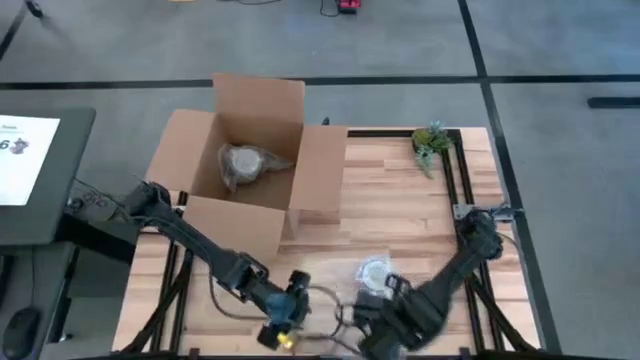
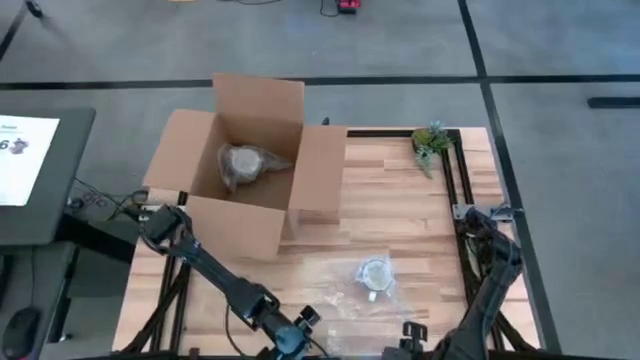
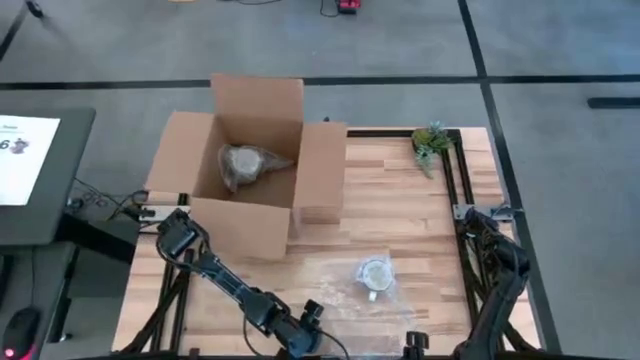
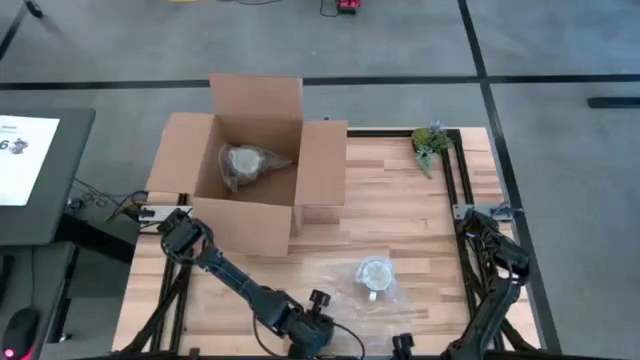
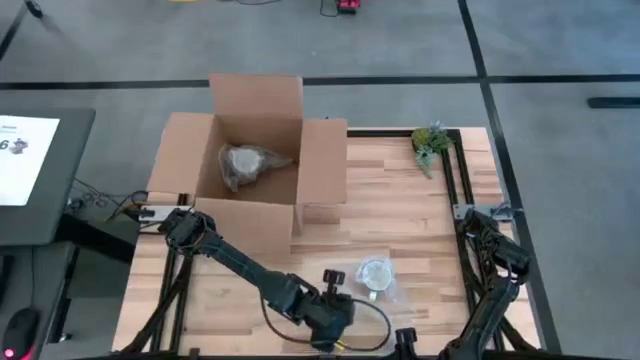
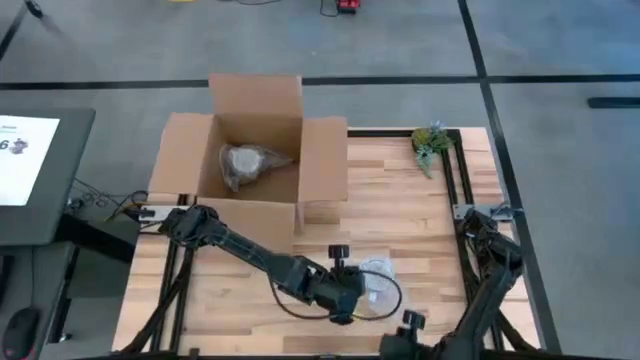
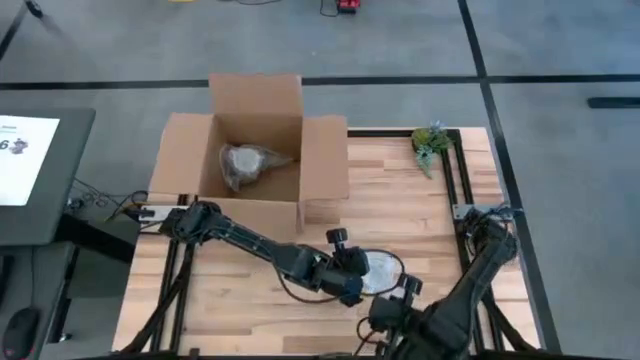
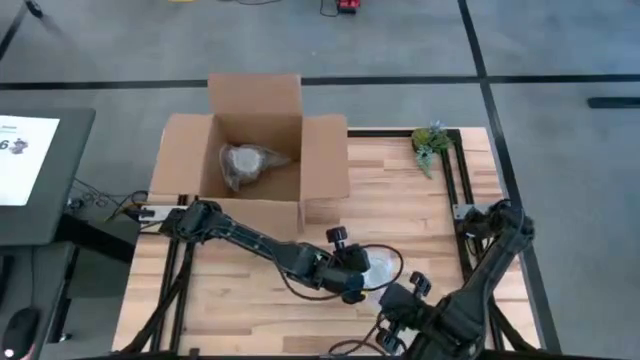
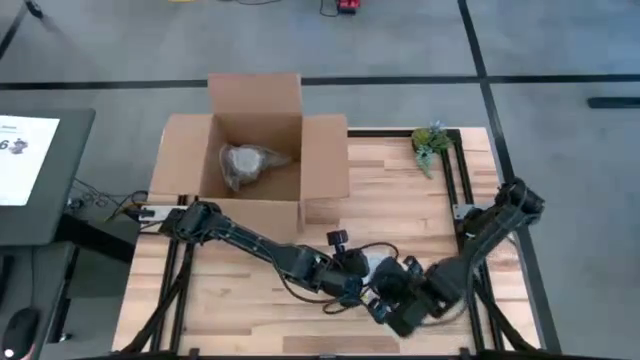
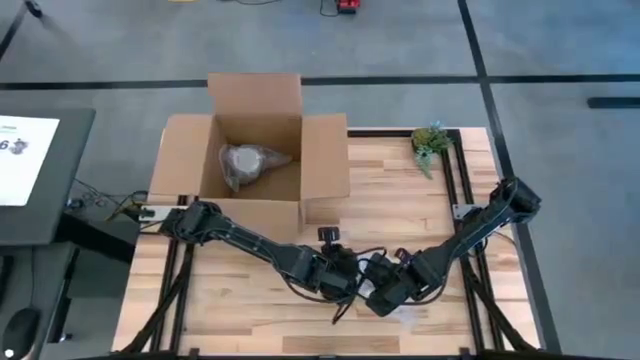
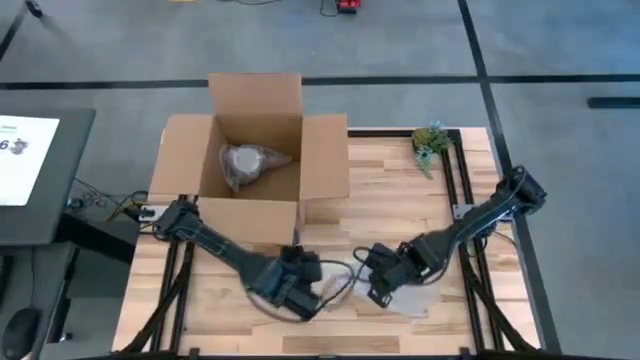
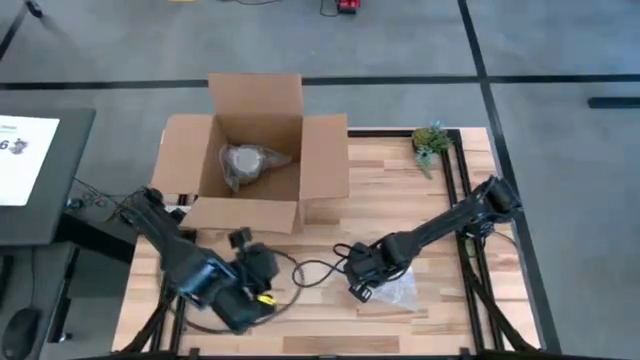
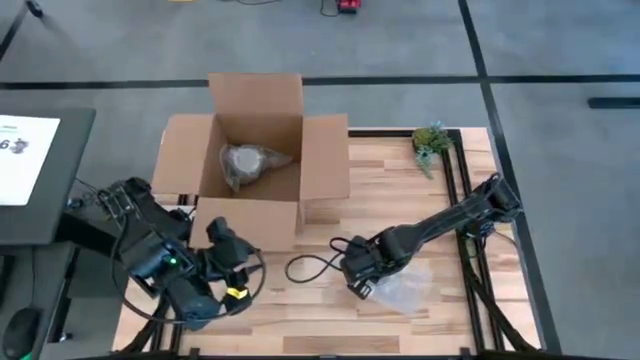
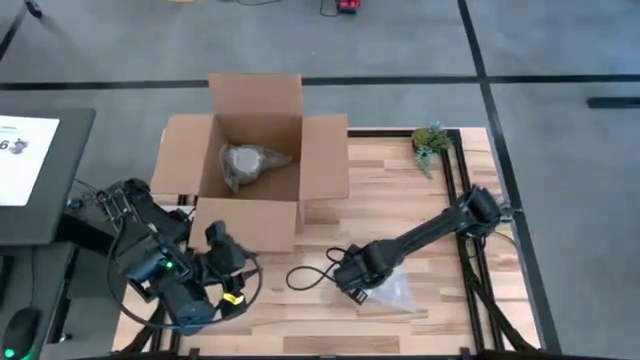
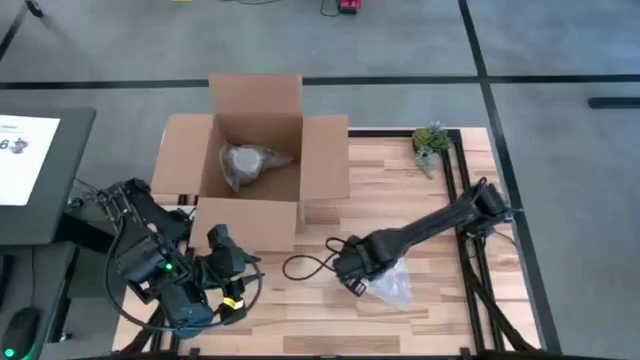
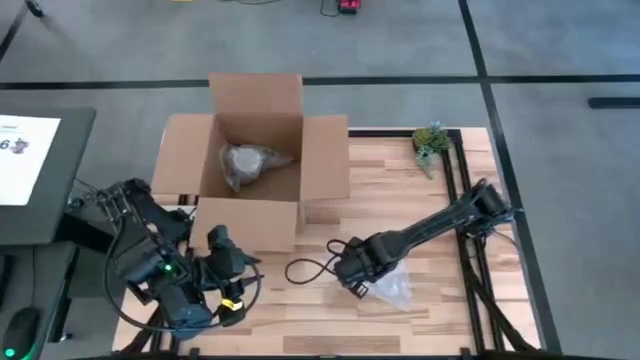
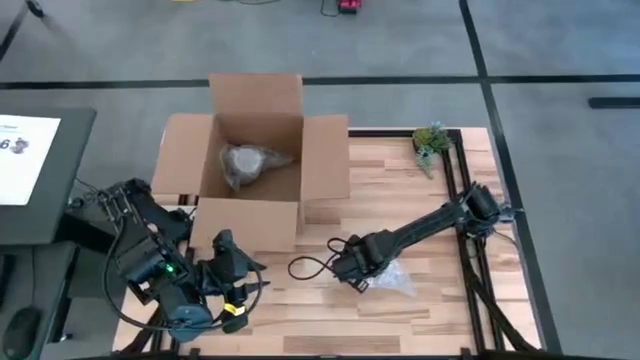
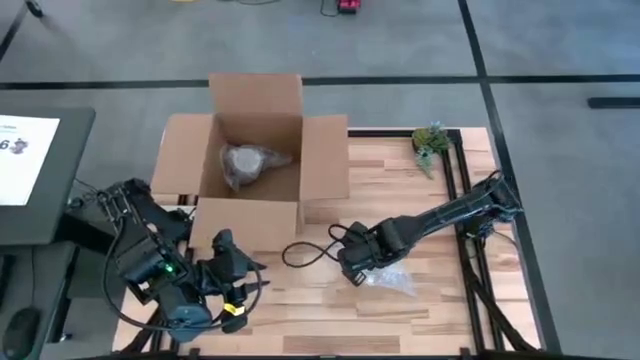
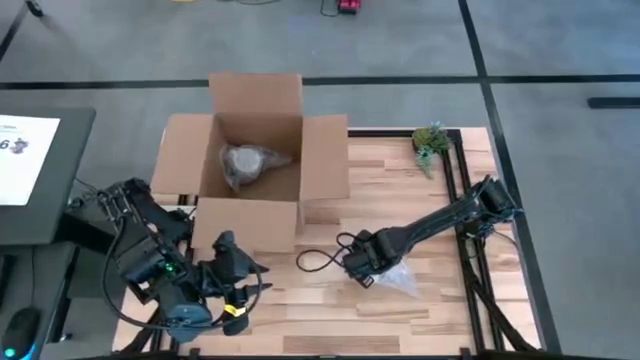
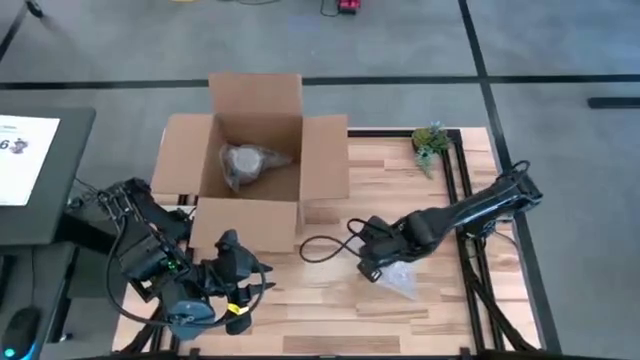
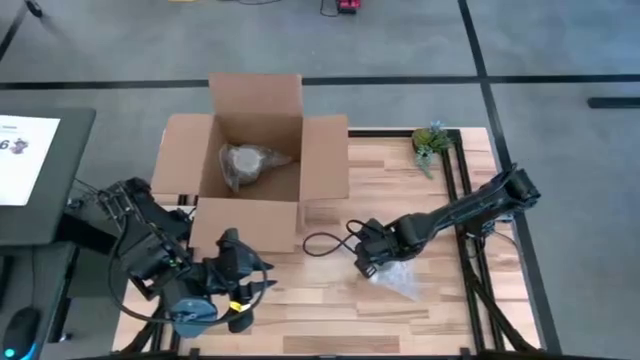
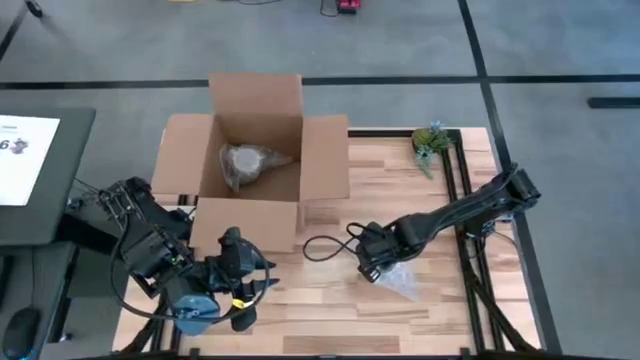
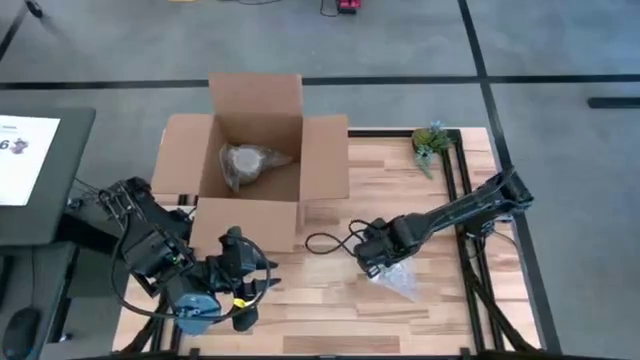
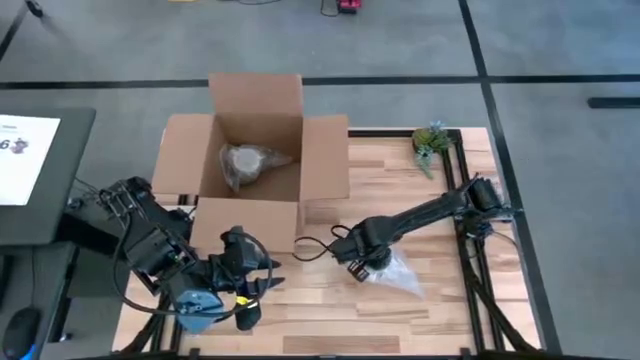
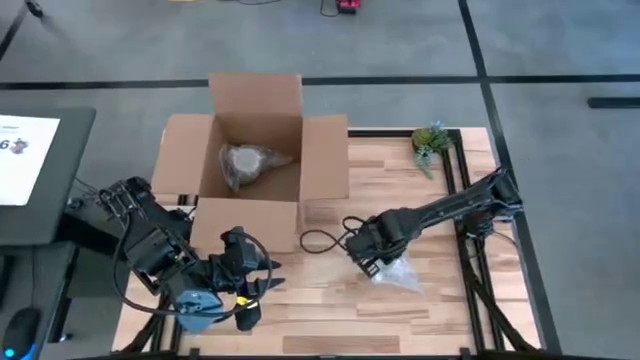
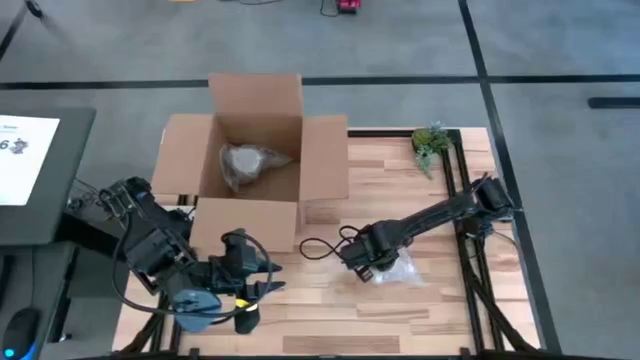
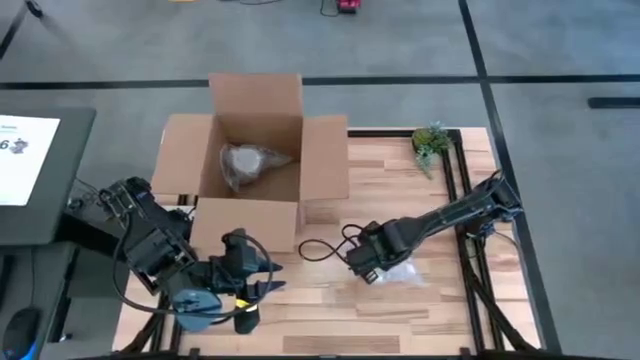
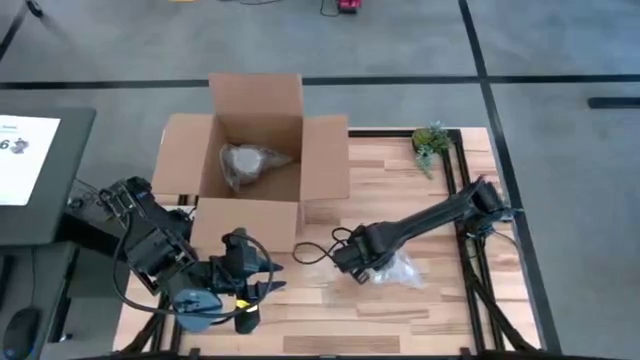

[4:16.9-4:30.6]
Task: wrap mug
Wrap the blue patterned mug with the bubble wrap

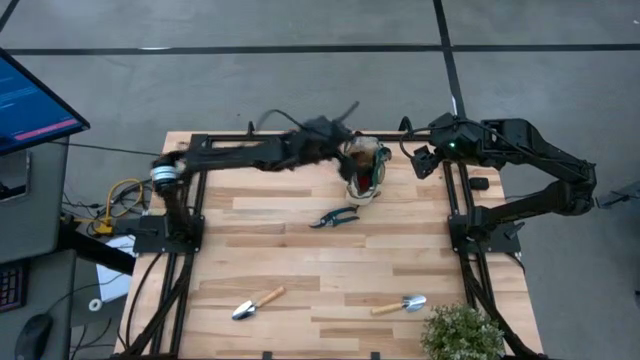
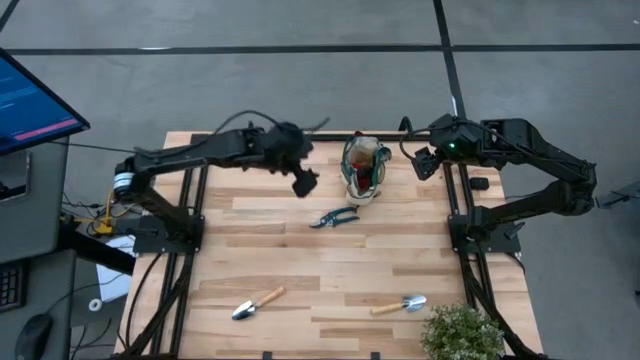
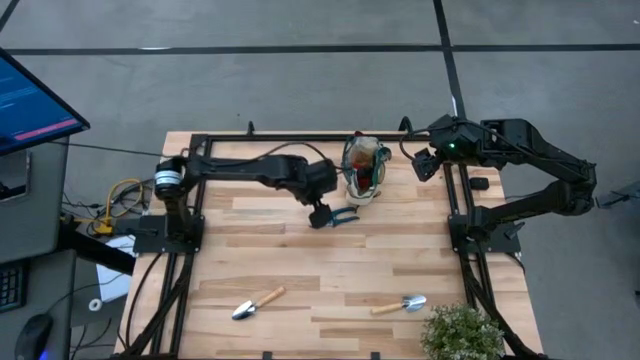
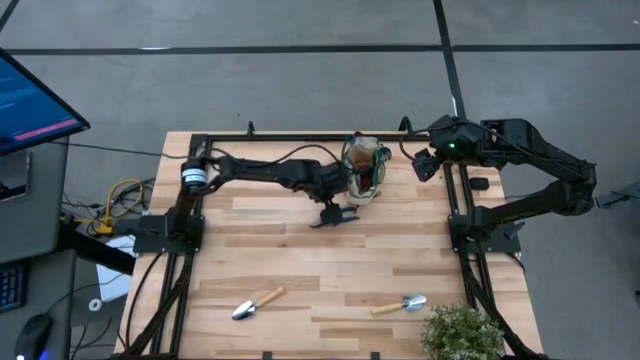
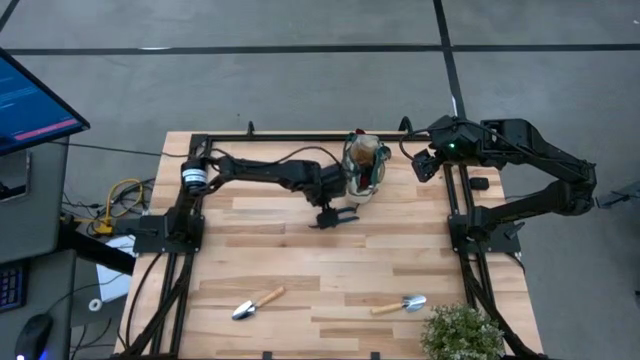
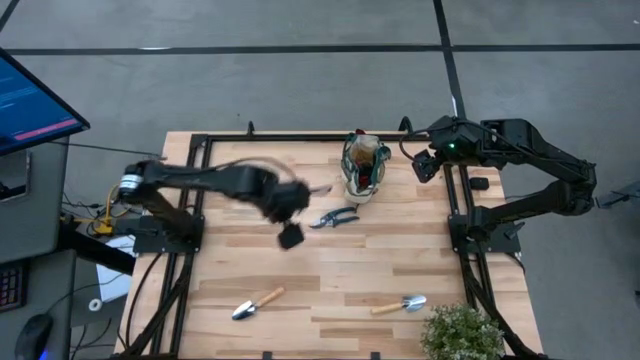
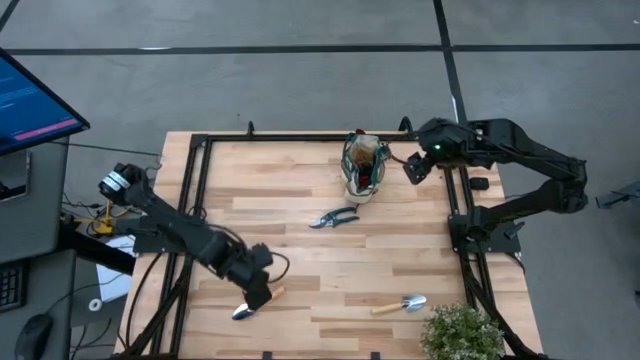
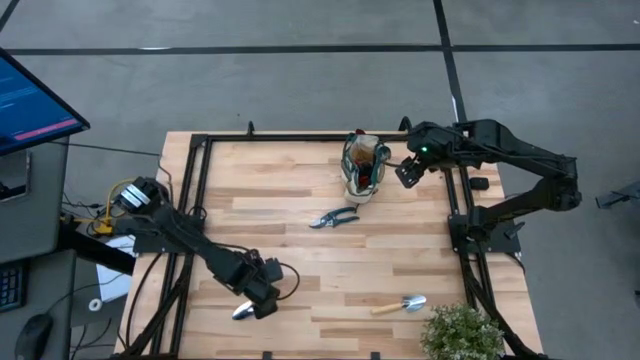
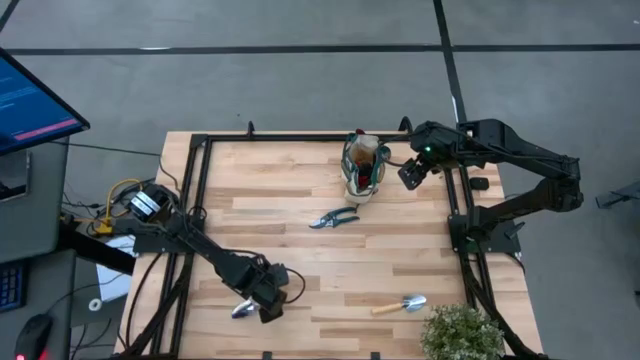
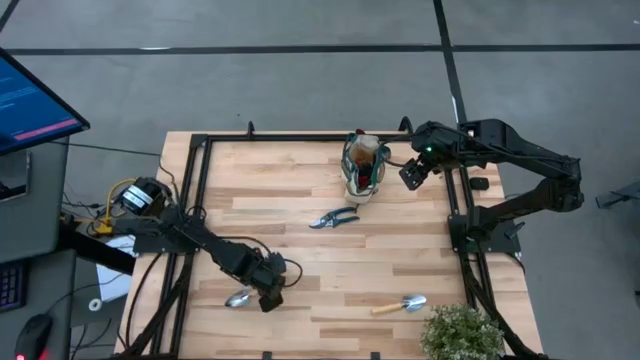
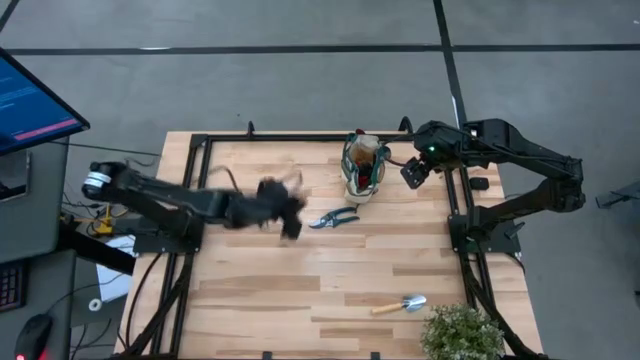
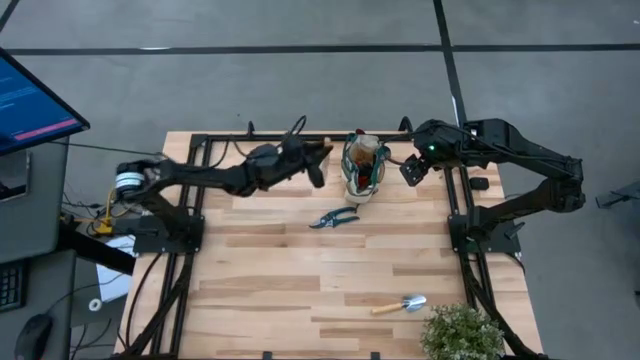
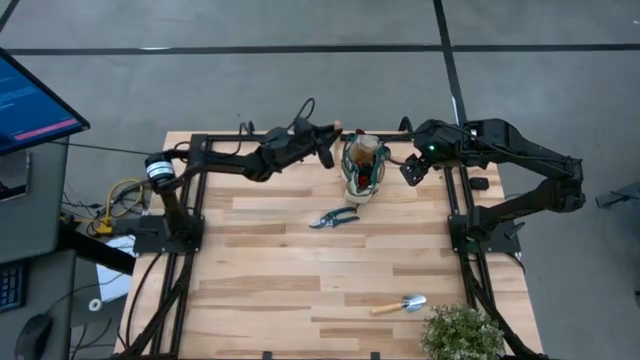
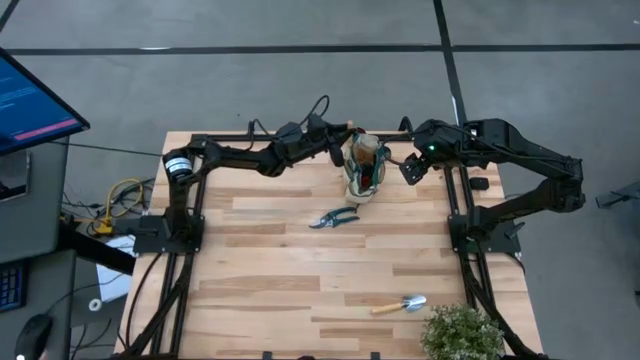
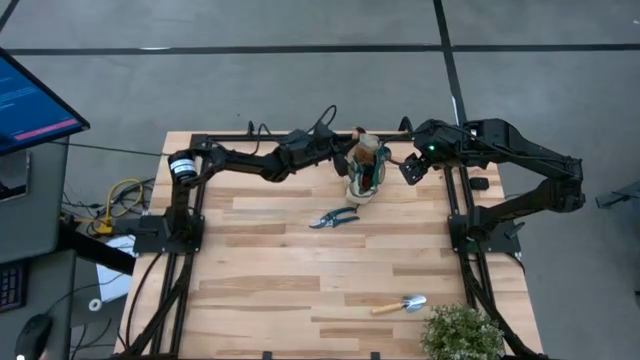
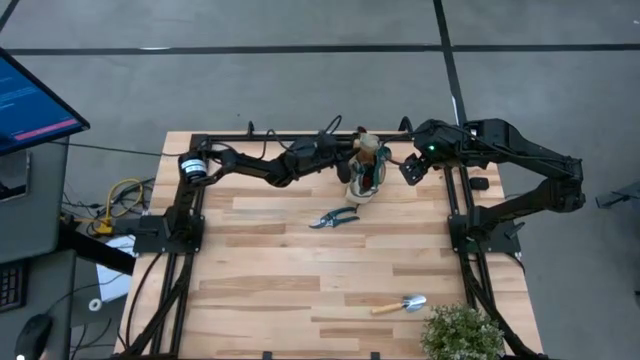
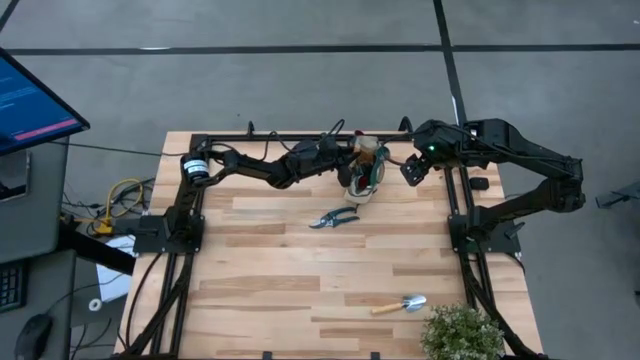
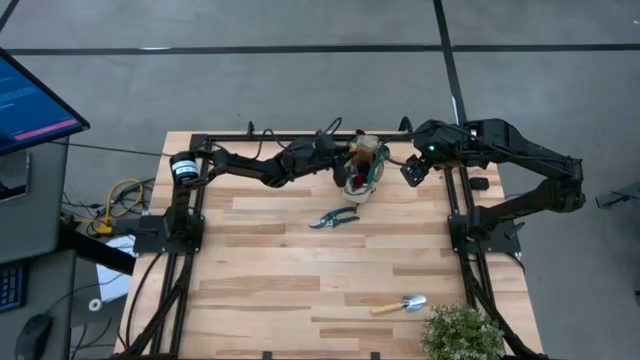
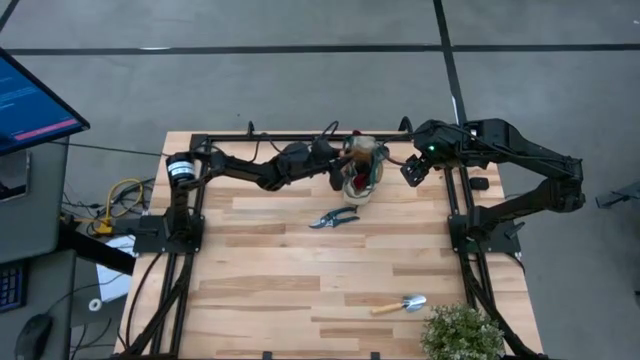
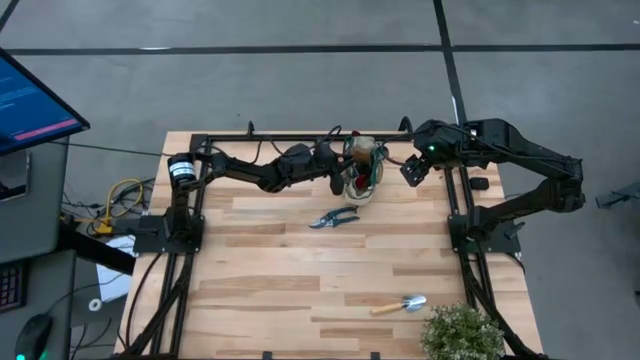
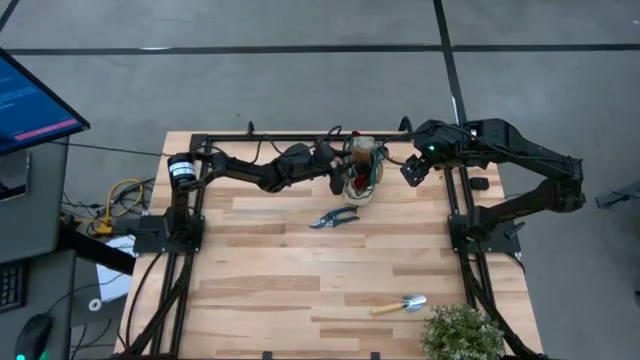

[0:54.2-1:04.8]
Task: Pick & Place Garden tools in Gardening bag
Put the trowel into the side pocket of the gardening bag
